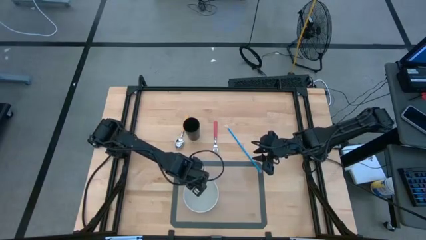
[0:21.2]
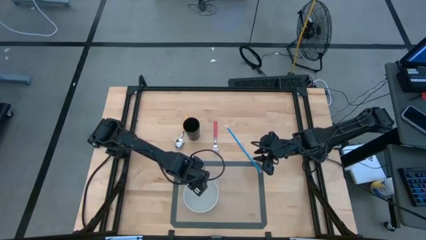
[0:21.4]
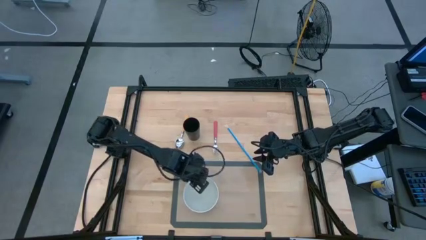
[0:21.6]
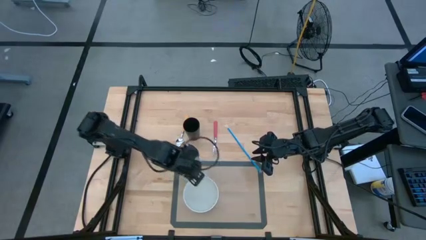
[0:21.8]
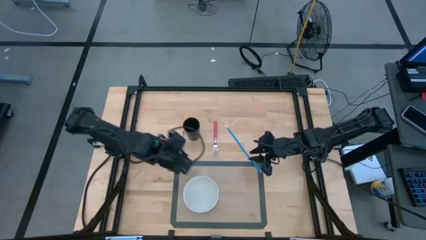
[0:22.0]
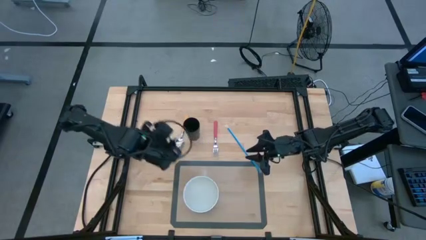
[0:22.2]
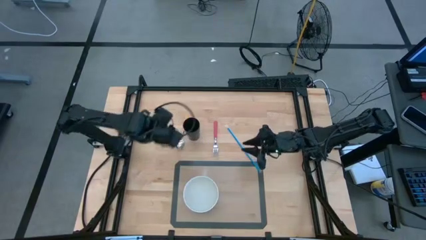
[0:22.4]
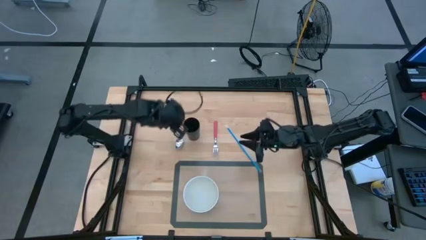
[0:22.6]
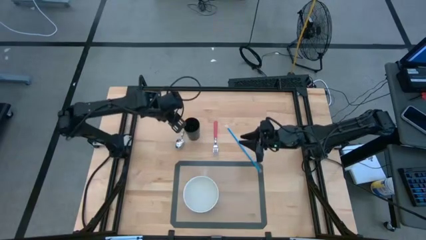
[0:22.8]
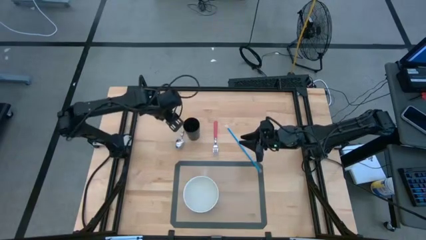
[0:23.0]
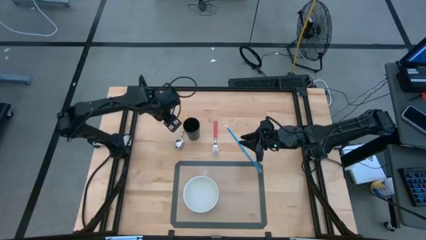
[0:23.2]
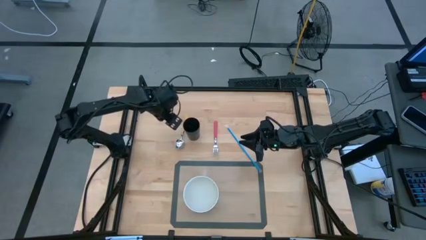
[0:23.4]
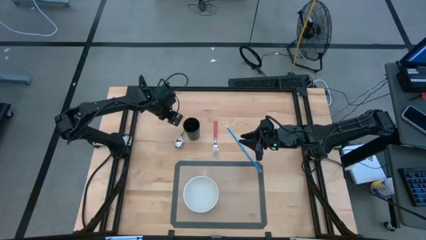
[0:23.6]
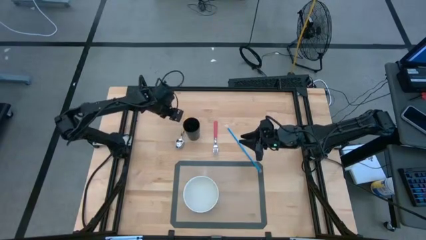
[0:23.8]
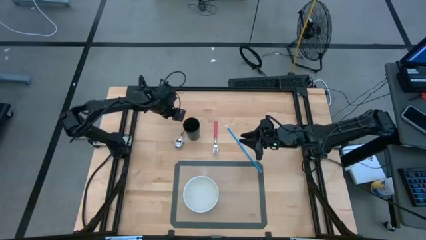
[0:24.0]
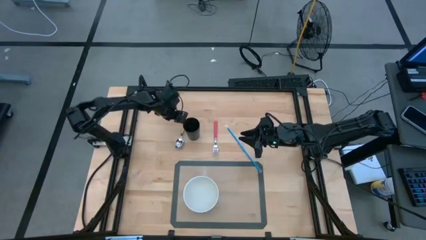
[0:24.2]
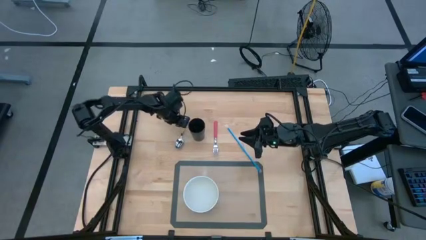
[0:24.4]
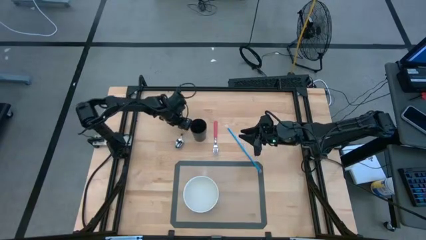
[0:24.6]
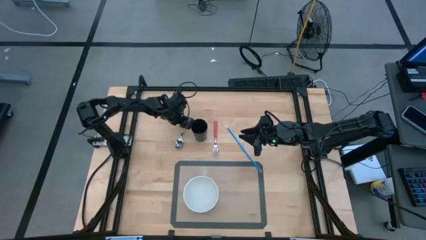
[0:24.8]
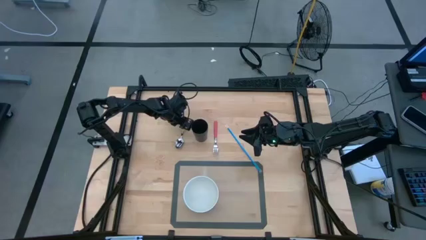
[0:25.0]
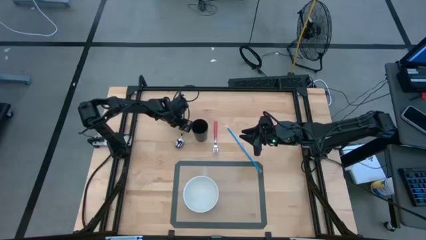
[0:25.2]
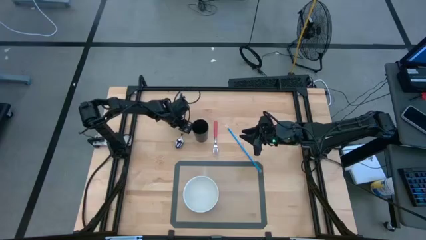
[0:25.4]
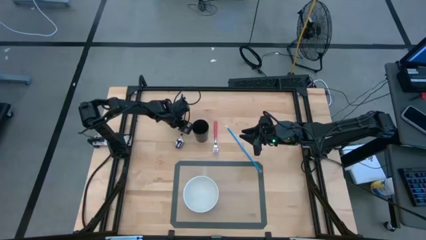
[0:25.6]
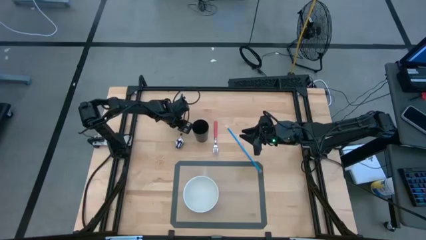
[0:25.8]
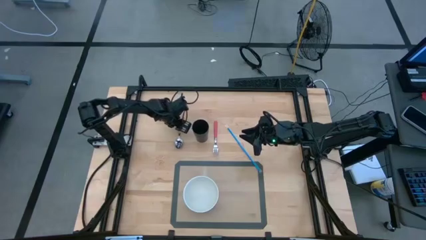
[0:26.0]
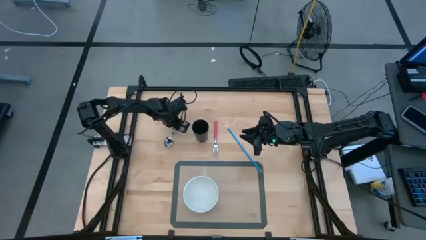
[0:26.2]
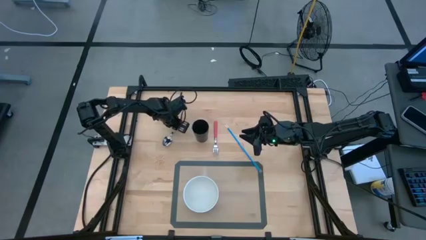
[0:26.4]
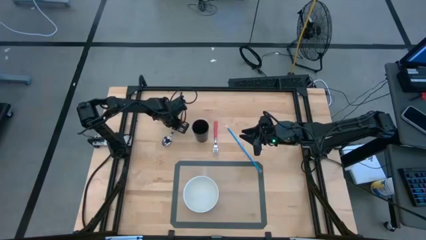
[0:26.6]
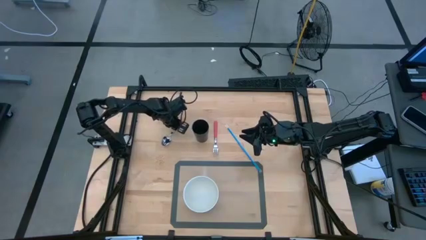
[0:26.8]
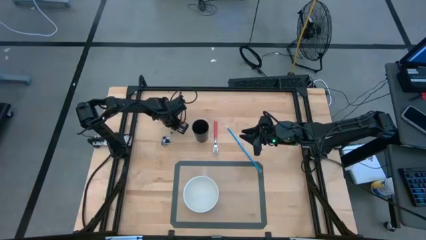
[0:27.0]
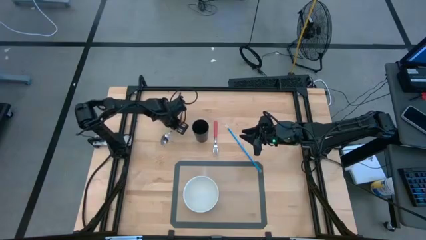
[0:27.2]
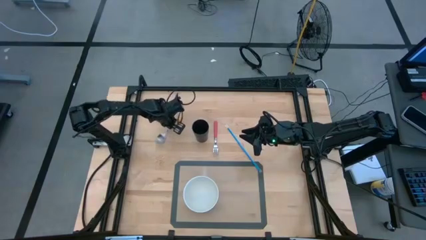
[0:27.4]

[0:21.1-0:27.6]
Task: Pick & Place Utensil
Put the yellow spoon into the white bowl on the mat

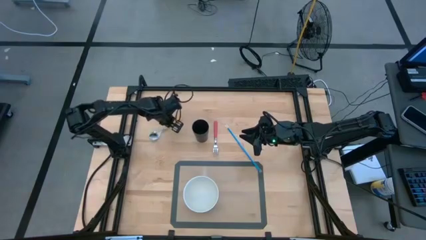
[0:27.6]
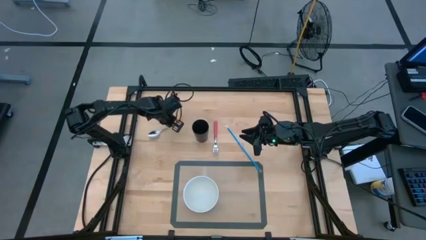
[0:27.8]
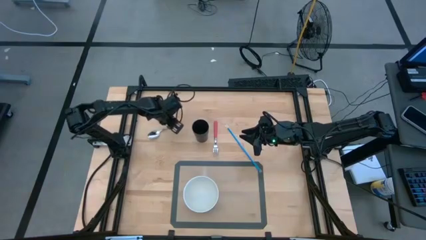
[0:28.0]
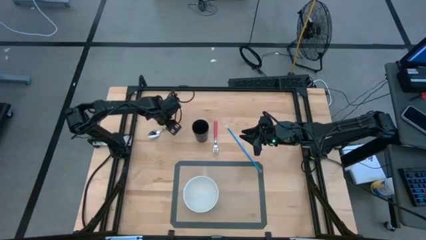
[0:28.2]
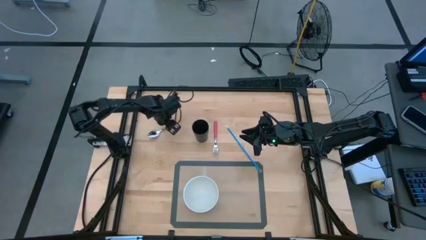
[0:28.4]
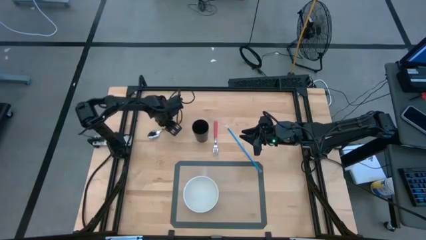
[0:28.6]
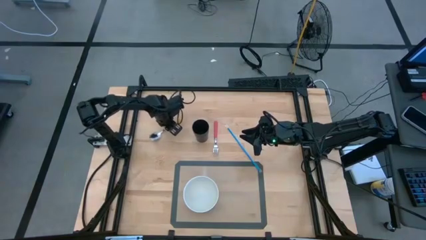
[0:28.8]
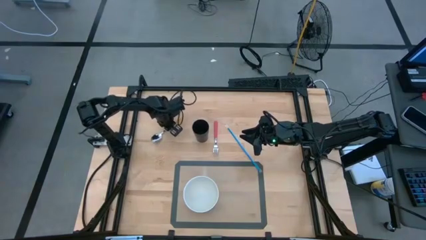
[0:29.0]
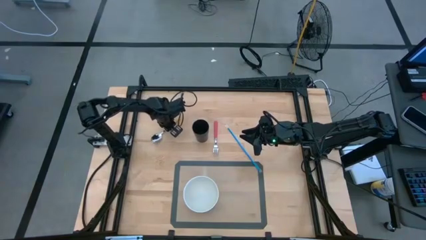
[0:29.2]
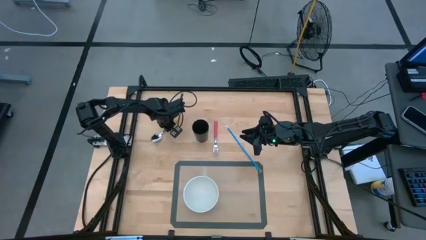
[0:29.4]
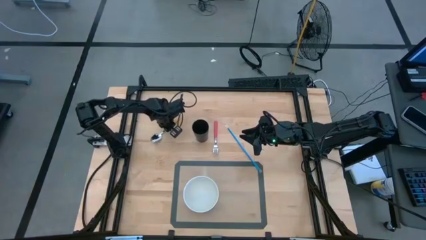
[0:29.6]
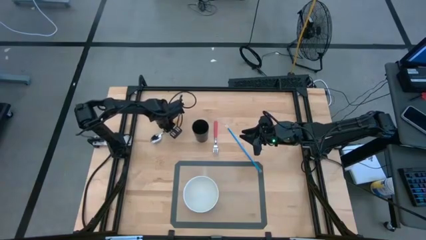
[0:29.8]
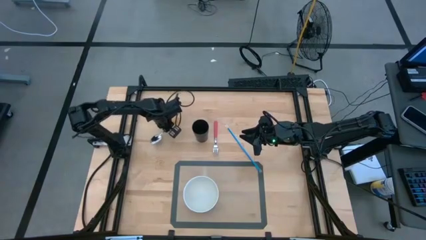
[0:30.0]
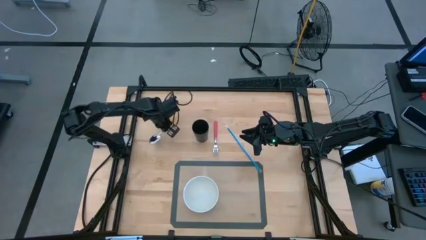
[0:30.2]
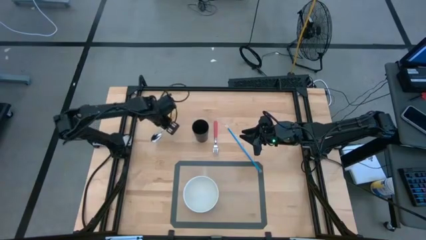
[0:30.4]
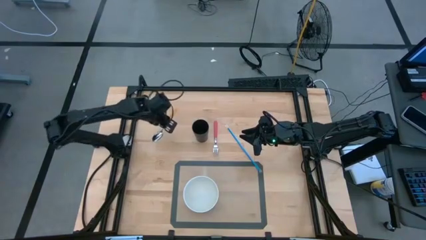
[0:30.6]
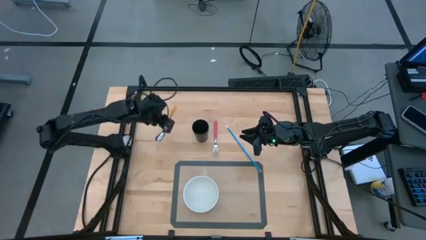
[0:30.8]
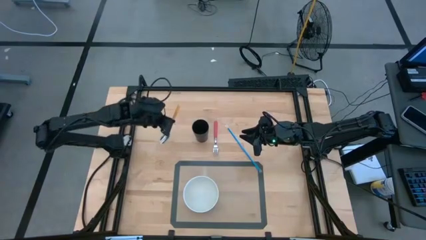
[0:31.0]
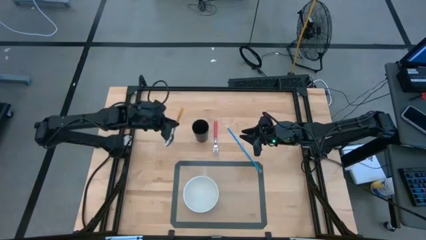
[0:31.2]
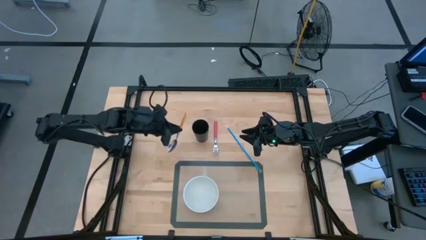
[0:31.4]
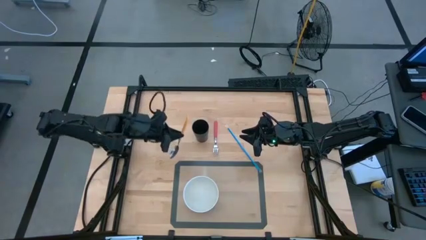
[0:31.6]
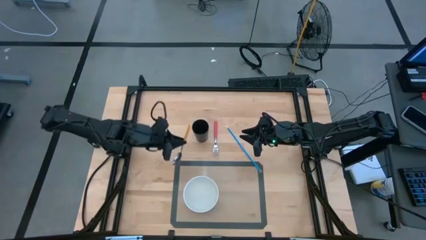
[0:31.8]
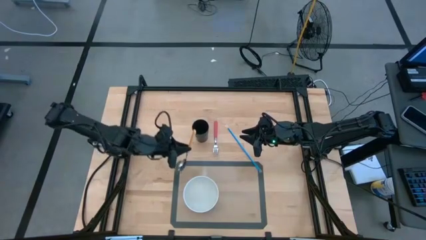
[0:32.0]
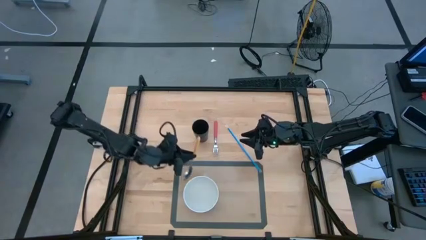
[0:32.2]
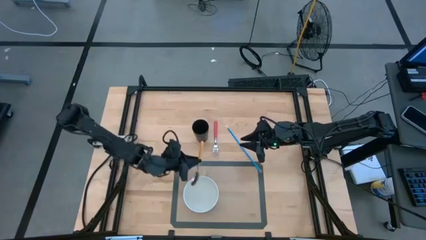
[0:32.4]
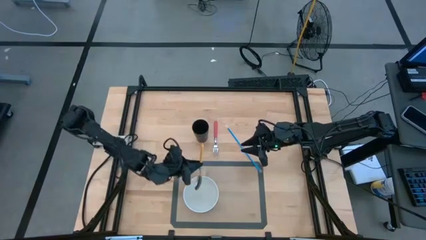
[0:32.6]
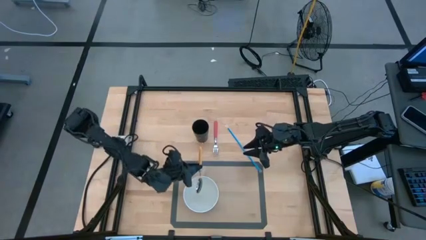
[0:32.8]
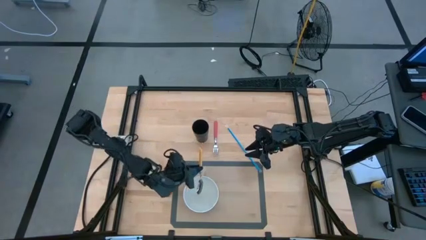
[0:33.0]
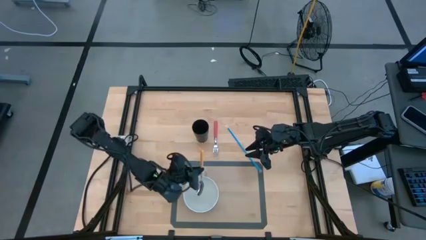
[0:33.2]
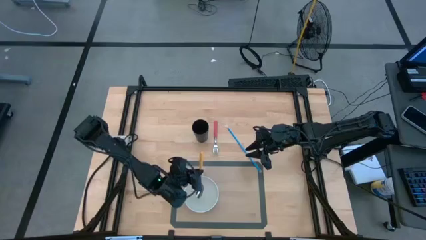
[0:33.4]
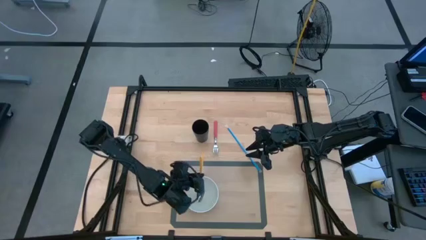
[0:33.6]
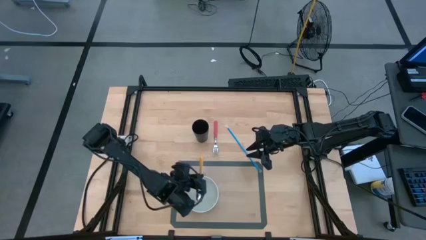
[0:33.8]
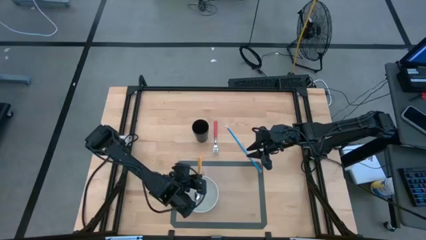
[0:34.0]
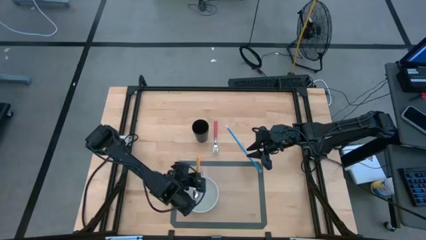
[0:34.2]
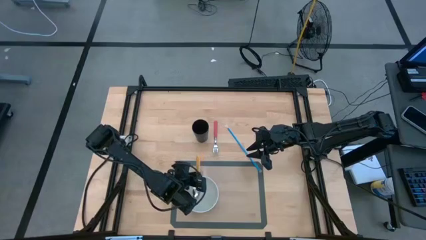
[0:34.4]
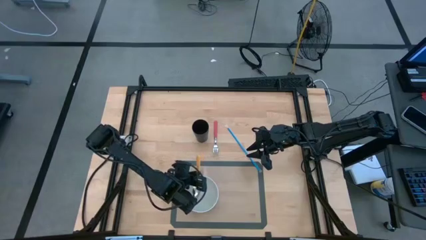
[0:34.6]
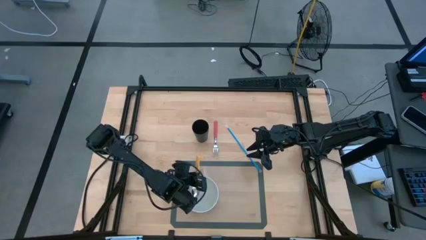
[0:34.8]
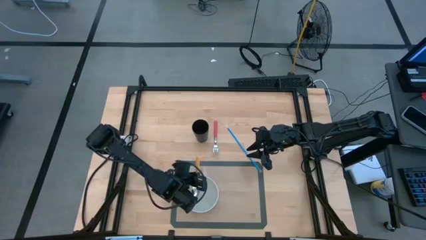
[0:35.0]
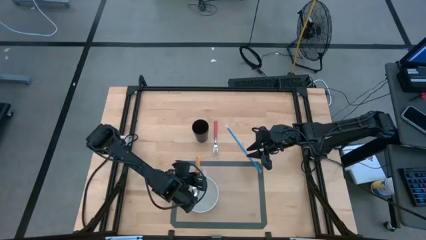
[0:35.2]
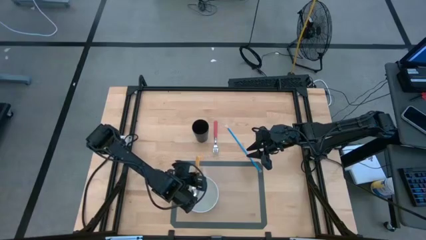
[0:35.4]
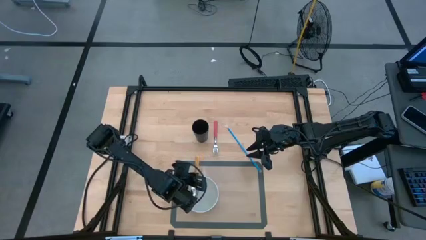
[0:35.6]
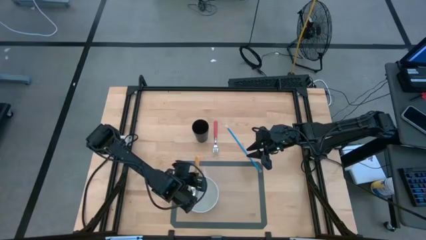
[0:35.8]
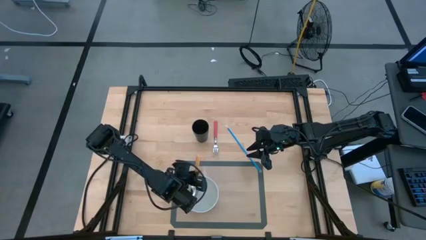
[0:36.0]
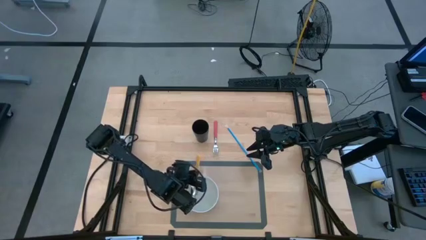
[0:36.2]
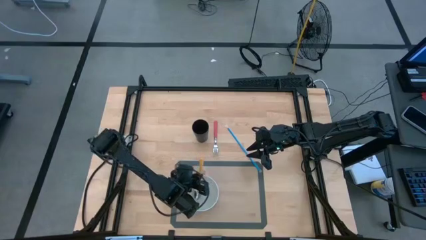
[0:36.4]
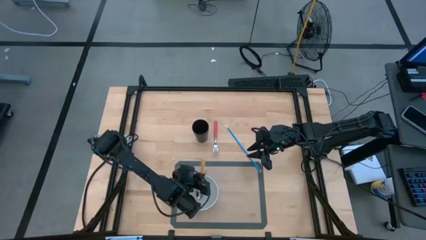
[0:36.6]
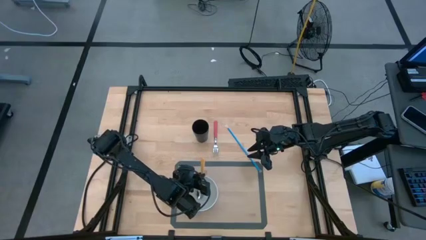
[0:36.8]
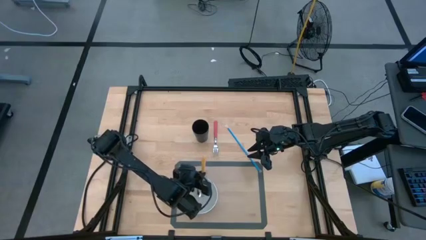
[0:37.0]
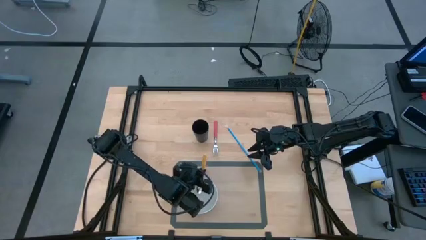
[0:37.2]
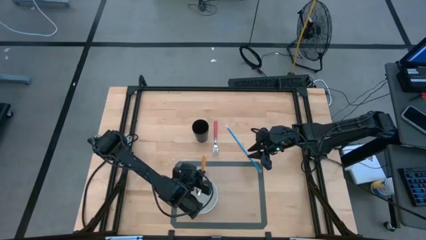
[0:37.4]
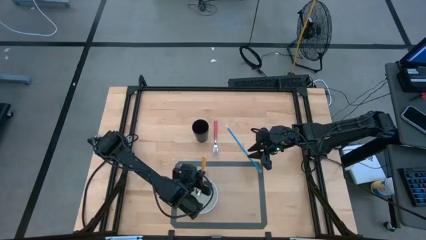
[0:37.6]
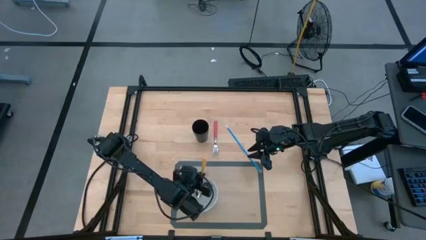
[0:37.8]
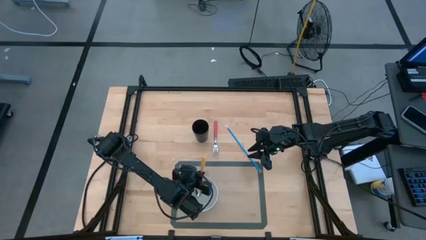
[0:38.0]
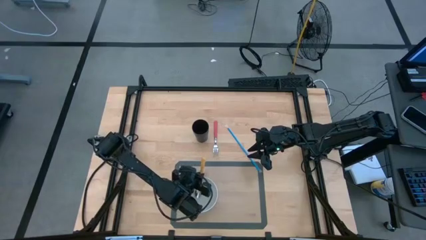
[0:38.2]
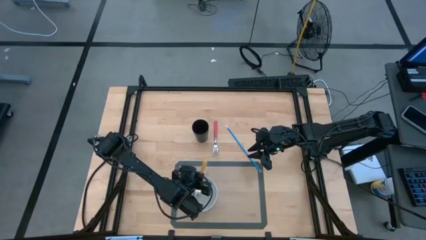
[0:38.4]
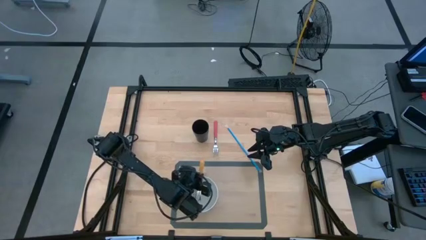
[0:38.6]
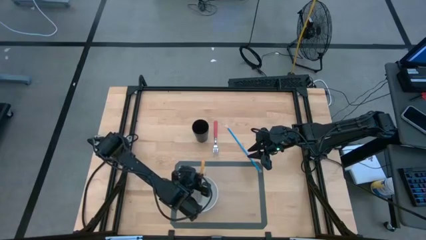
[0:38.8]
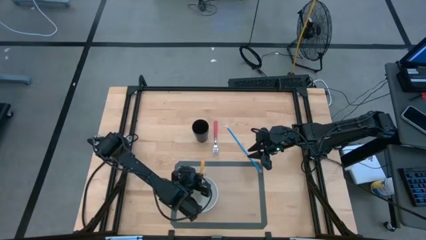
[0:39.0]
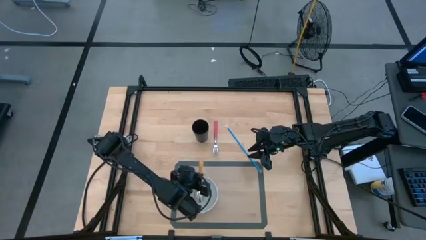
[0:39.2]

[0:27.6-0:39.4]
Put the yellow spoon into the white bowl on the mat
